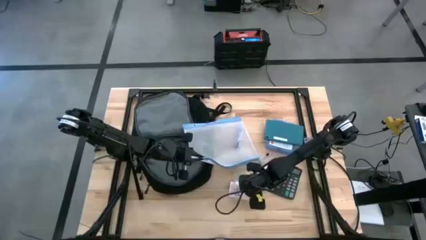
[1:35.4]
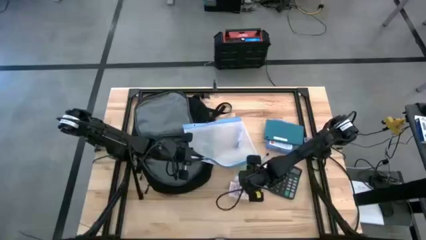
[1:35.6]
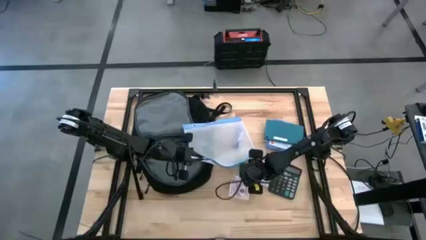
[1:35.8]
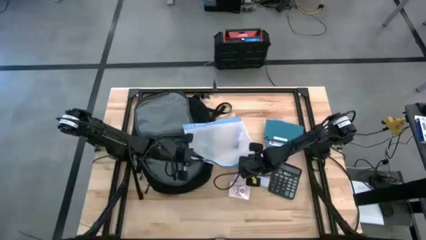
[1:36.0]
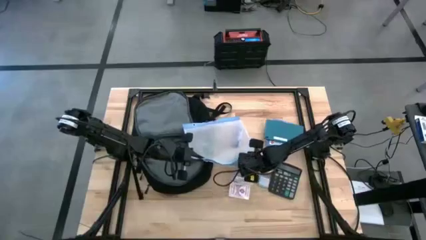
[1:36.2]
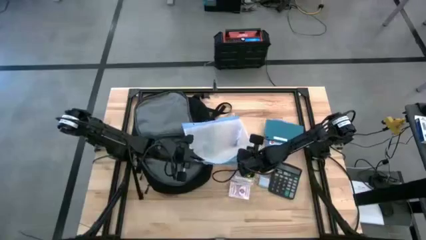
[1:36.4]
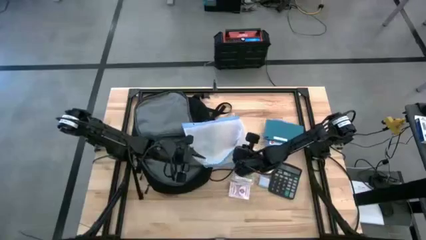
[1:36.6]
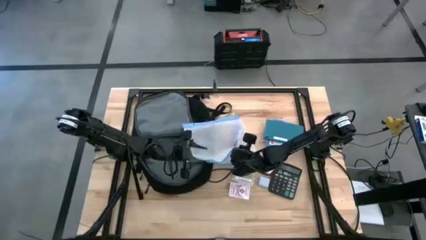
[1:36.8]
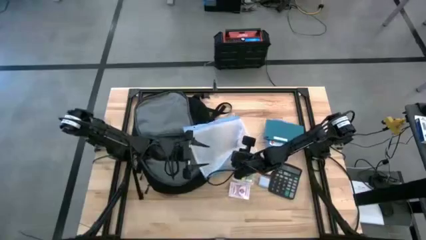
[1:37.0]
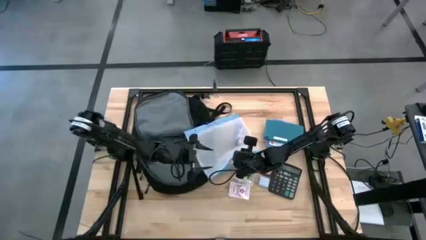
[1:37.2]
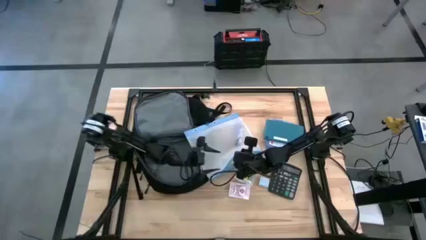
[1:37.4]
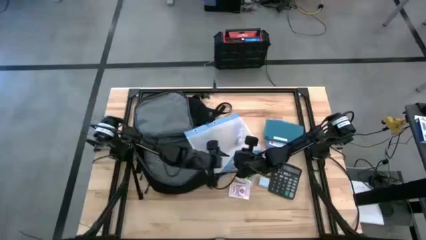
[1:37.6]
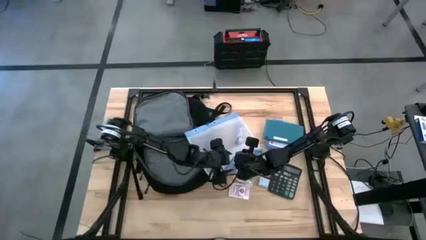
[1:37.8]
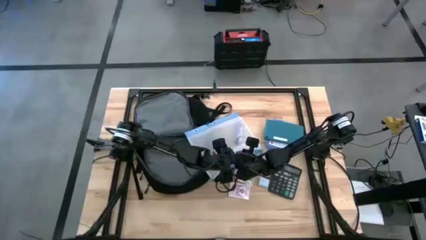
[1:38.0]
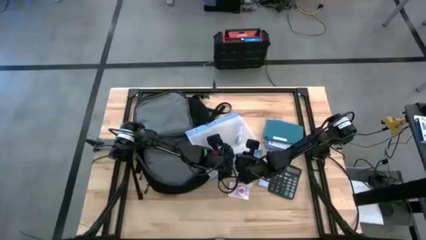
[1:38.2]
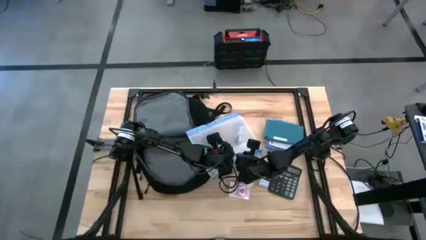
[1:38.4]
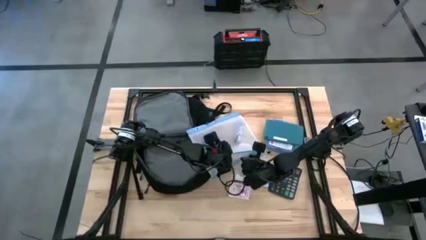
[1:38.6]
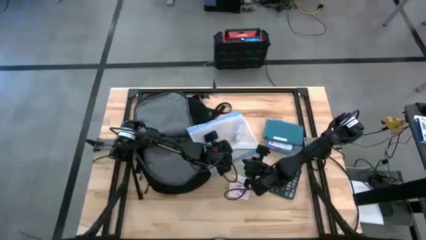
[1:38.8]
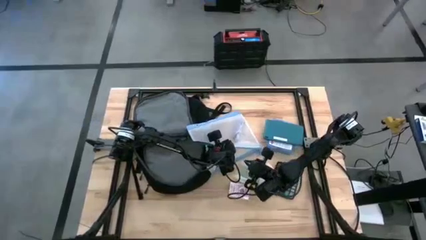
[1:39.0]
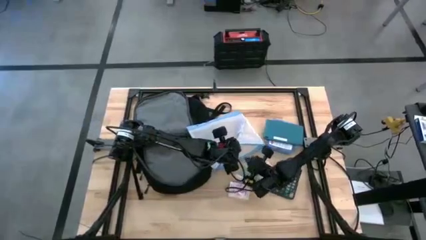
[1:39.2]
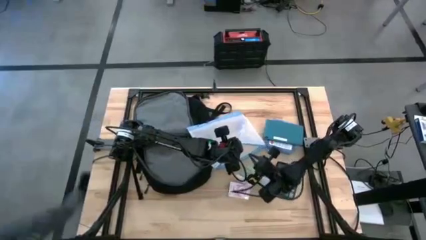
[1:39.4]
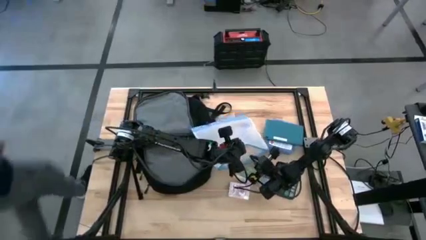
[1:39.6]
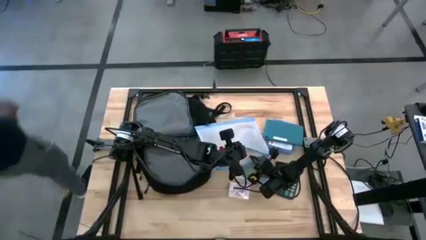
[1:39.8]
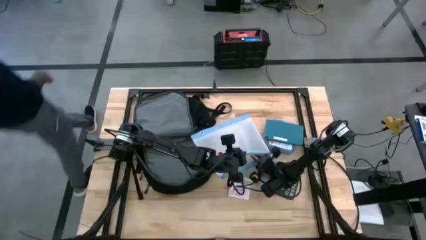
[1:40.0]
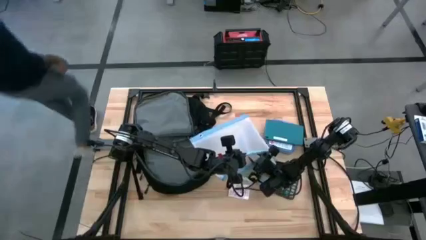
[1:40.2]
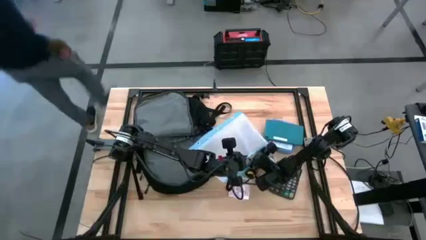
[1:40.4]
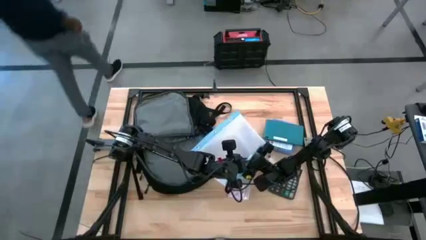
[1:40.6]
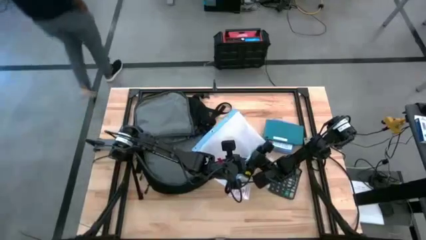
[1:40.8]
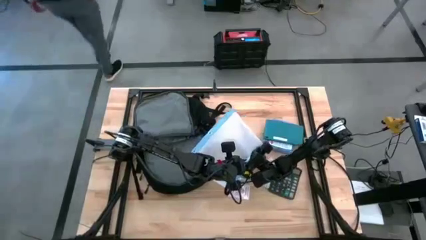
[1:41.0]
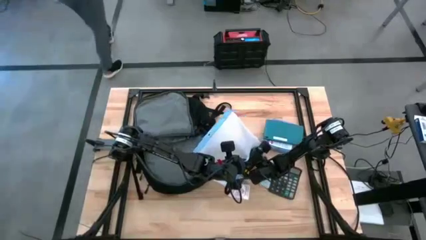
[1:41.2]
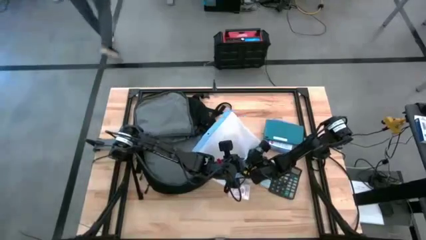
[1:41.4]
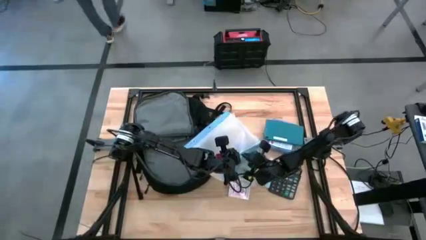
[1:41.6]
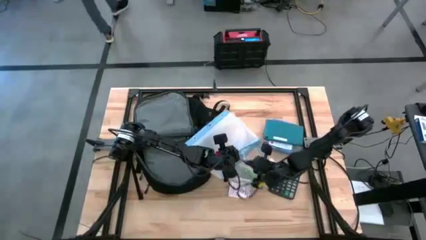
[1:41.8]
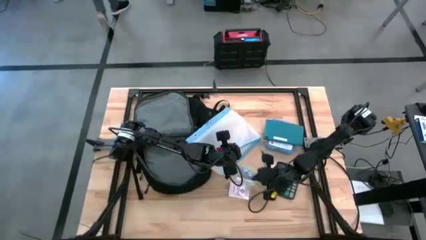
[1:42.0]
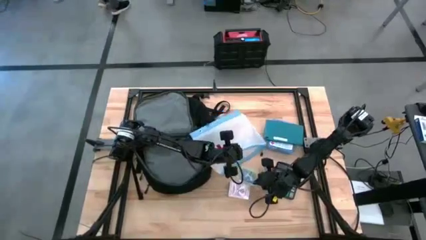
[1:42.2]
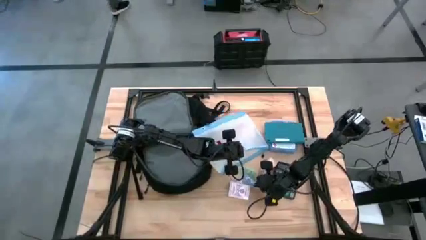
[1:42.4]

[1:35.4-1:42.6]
Task: Unpack backpack
Remove the blue granola bar from the white mesh zipper pouch

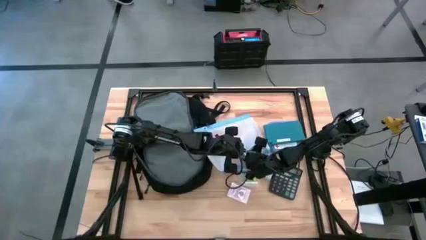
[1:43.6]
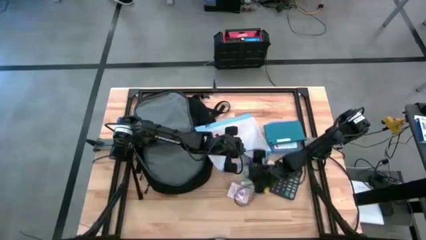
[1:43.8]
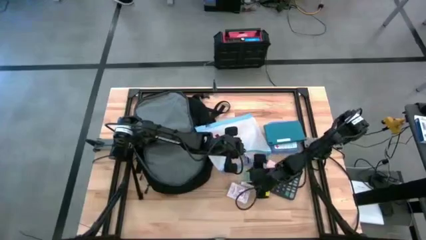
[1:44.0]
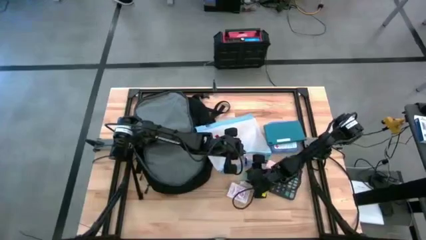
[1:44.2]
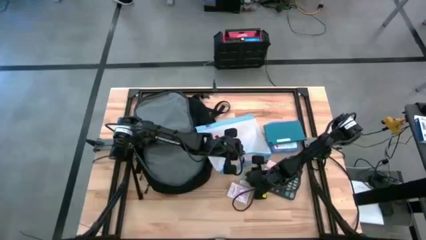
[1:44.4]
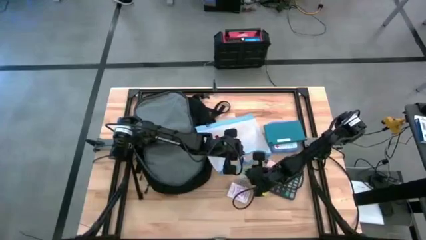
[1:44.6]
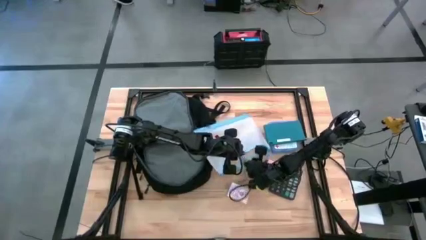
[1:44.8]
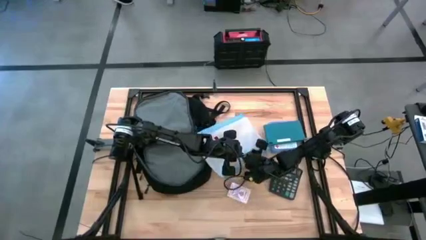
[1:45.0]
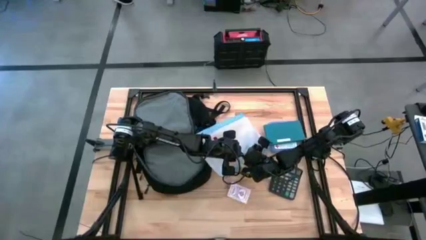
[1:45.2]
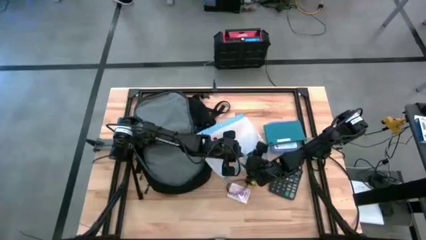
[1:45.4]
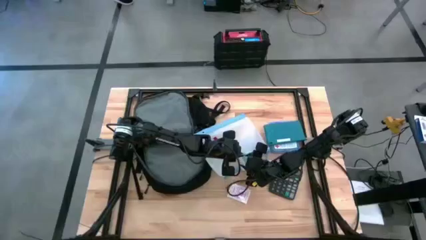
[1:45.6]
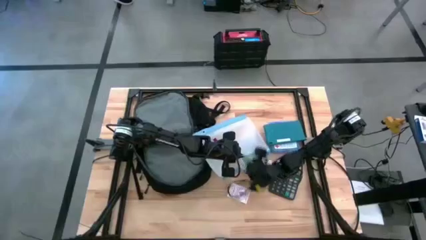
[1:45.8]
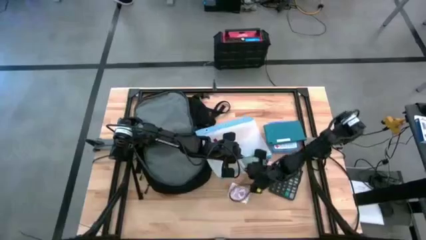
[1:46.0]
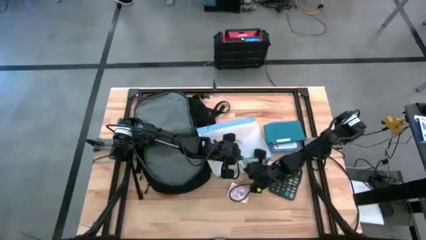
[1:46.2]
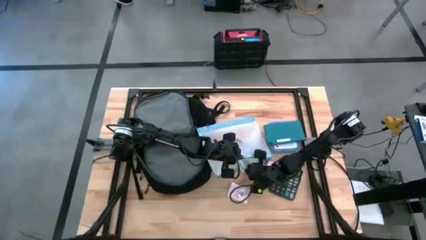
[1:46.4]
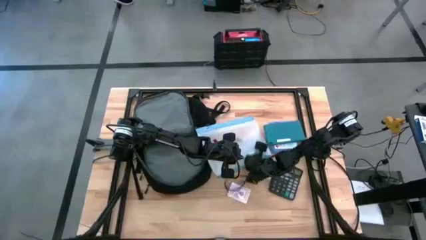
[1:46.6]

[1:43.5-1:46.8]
Put the green earphones into the white mesh zipper pouch

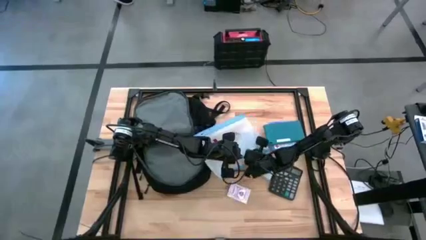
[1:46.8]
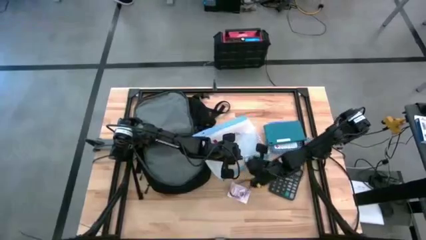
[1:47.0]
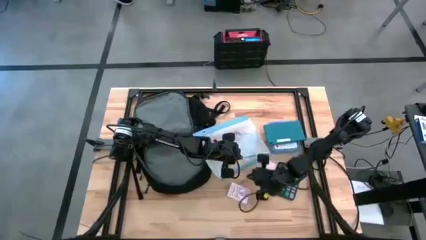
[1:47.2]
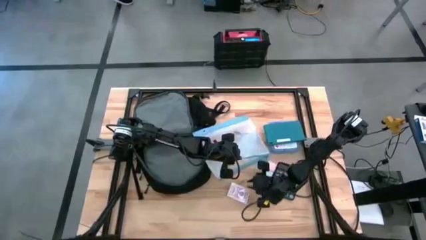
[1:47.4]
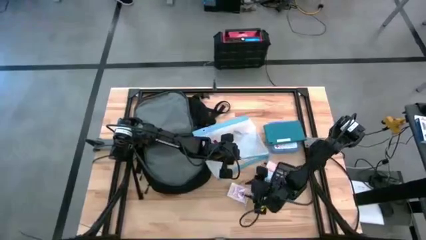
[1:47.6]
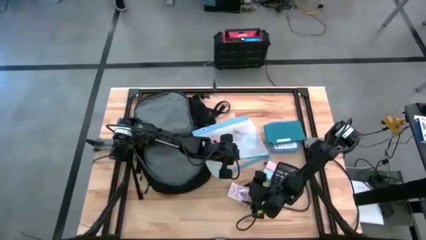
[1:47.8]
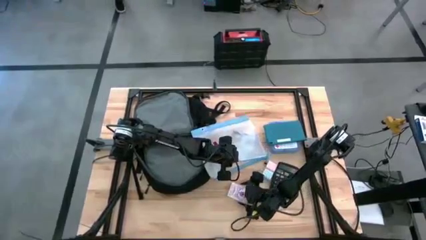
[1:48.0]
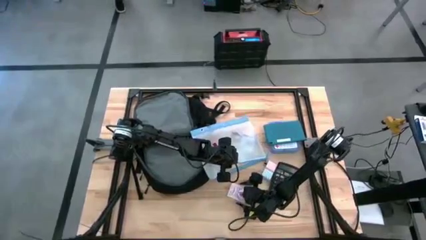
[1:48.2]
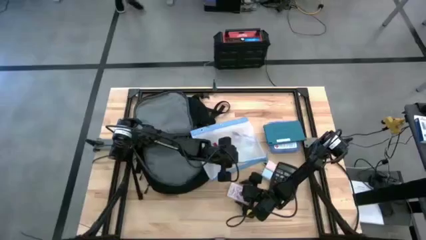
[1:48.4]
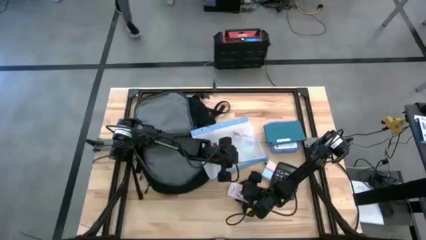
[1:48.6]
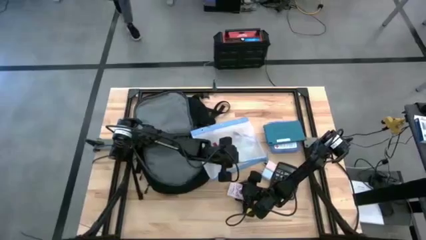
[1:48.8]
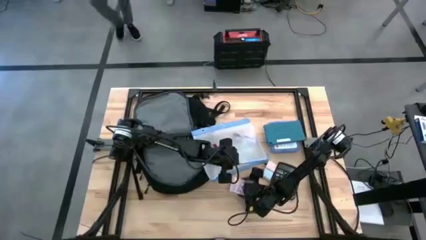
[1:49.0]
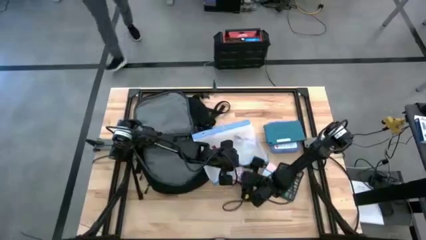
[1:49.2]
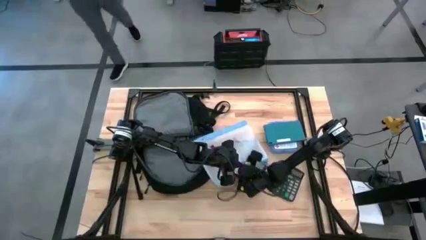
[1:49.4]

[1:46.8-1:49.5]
Put the red playing cards into the white mesh zipper pouch

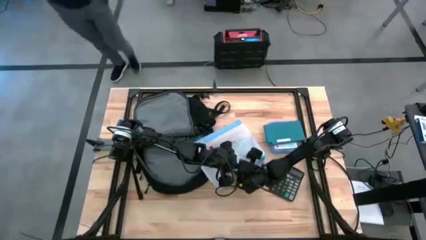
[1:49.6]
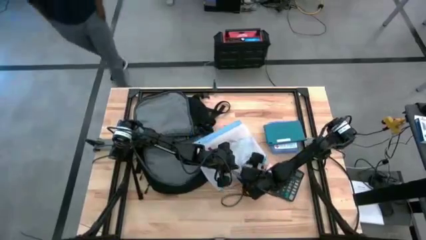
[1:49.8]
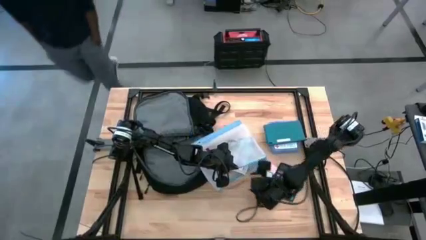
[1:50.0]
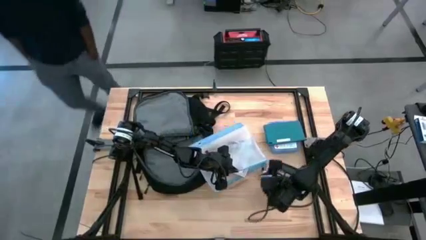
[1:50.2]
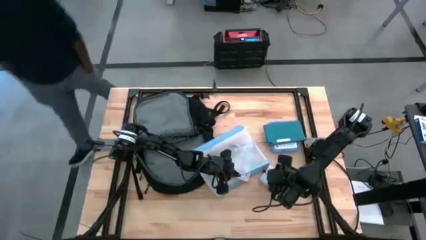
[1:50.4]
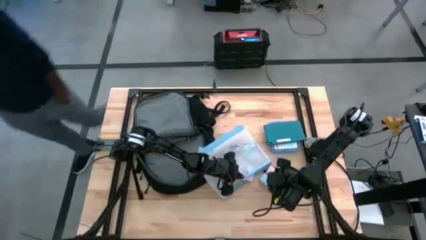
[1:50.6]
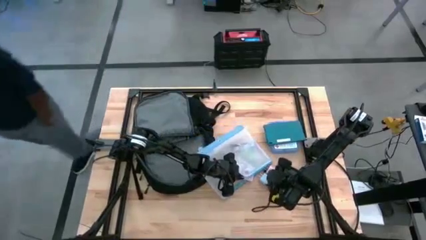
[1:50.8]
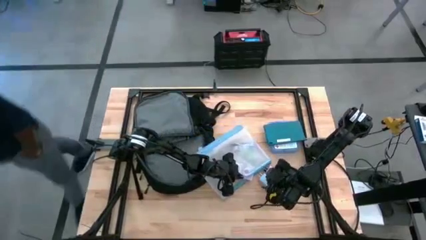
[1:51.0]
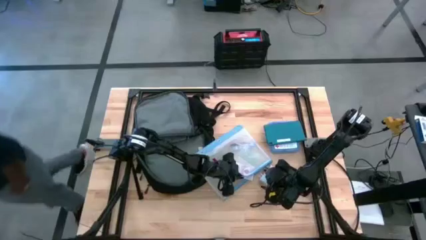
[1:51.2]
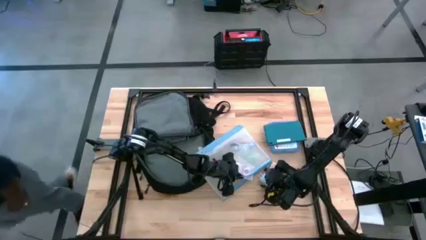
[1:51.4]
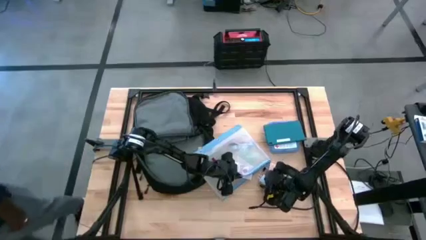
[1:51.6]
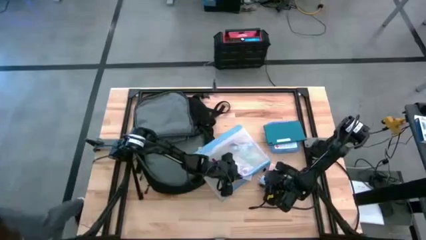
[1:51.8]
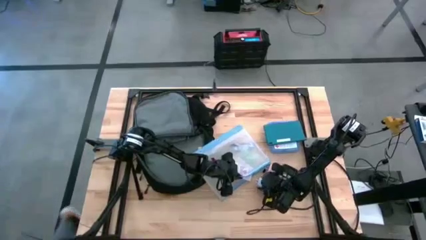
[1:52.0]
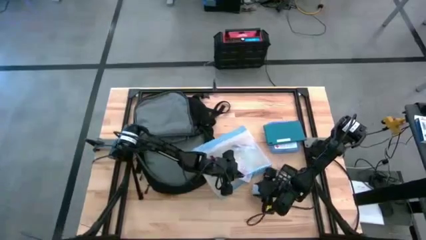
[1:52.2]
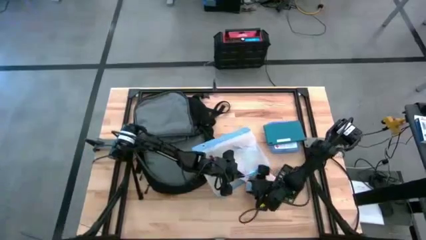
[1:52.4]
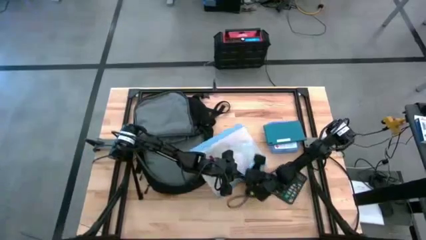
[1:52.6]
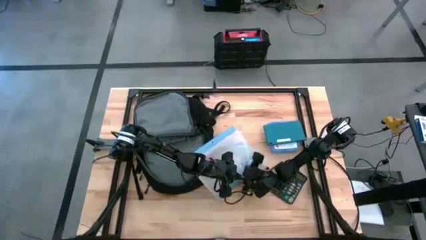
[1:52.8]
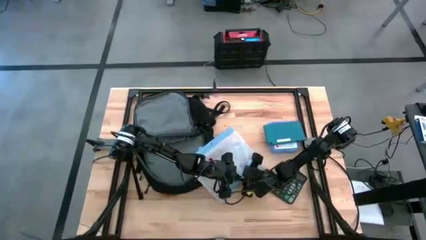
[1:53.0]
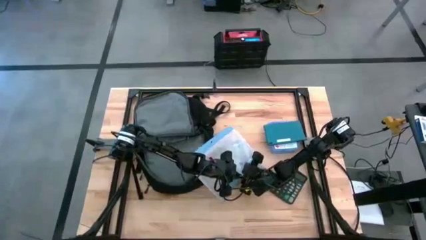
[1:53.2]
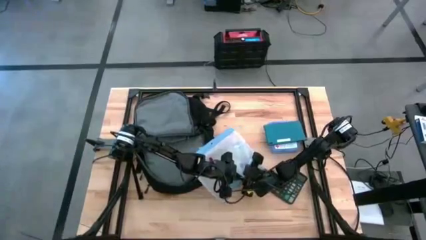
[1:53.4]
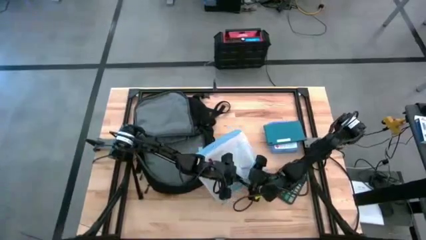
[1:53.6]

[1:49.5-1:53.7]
Put the blue charger adapter into the white mesh zipper pouch
